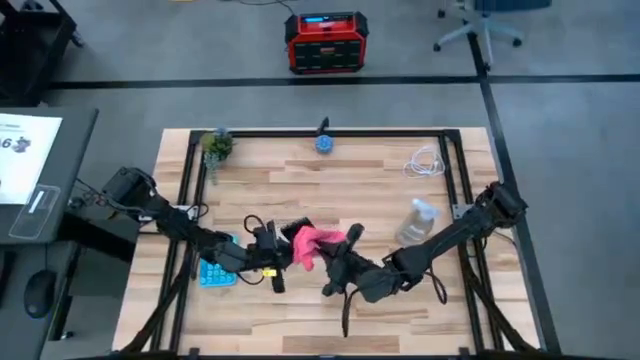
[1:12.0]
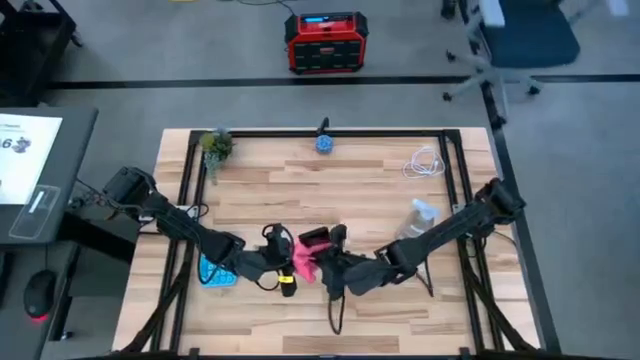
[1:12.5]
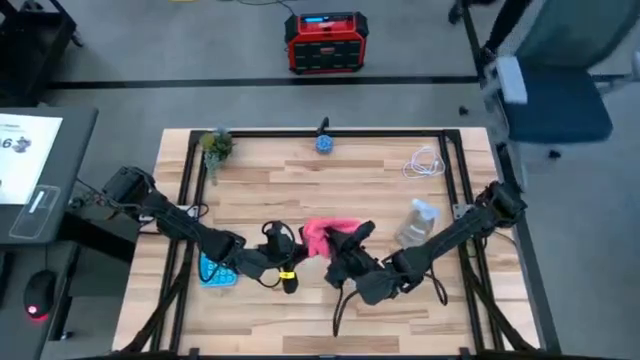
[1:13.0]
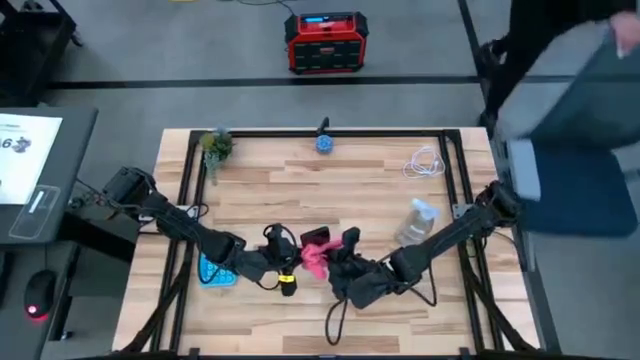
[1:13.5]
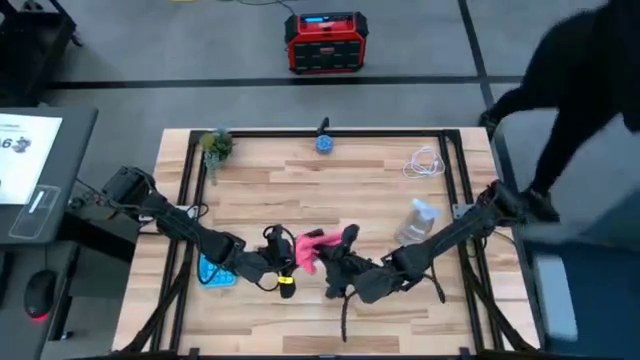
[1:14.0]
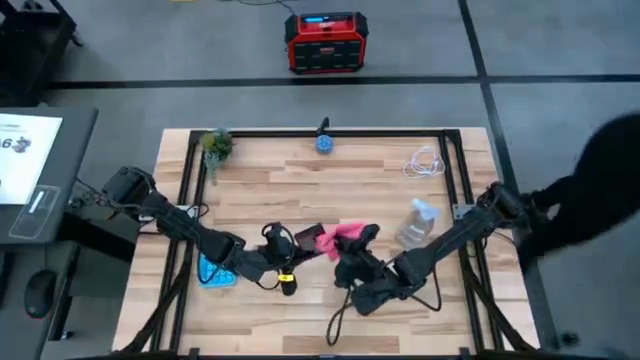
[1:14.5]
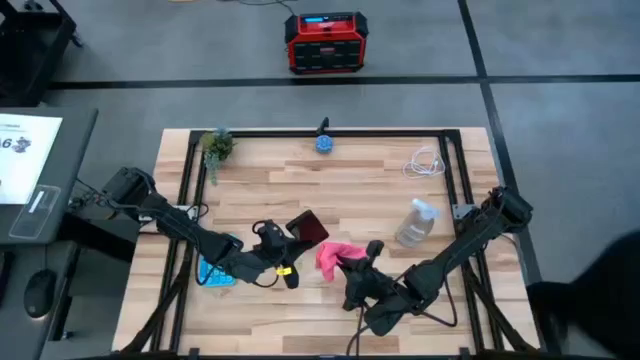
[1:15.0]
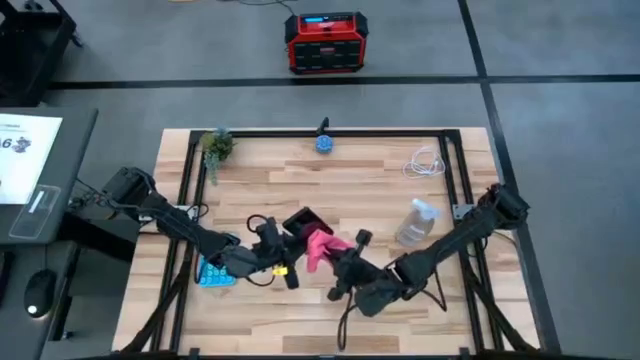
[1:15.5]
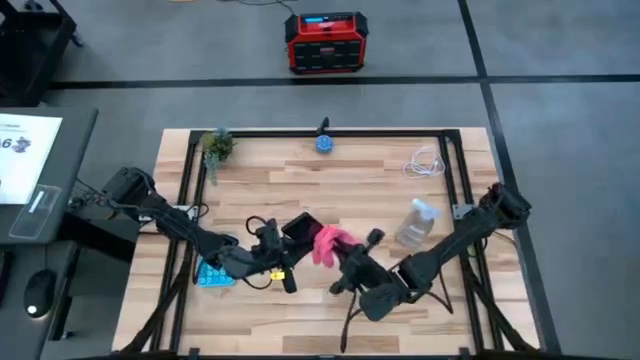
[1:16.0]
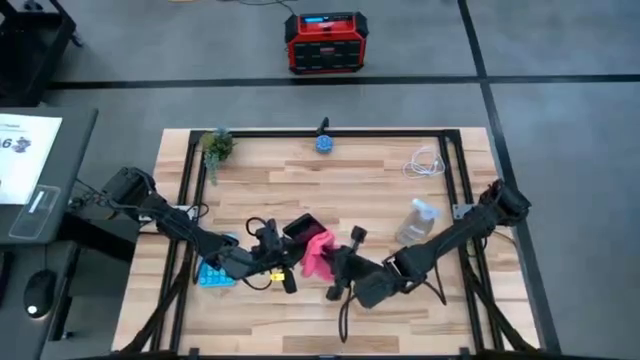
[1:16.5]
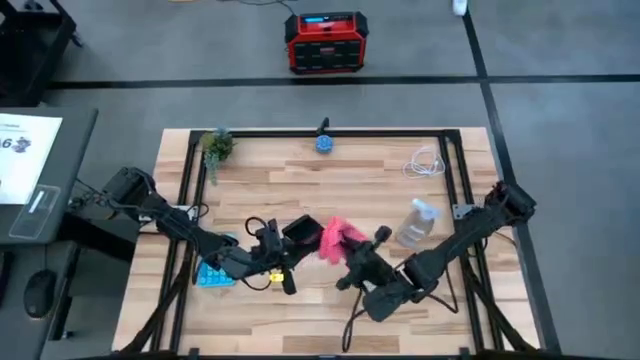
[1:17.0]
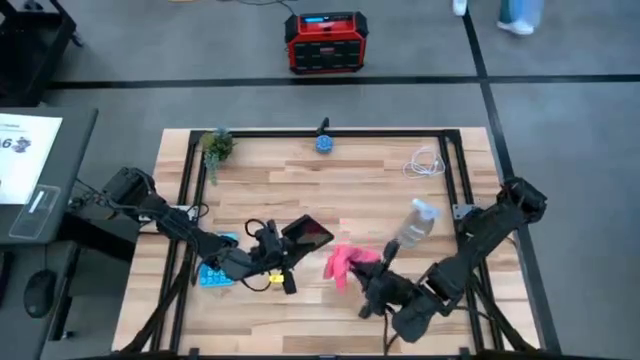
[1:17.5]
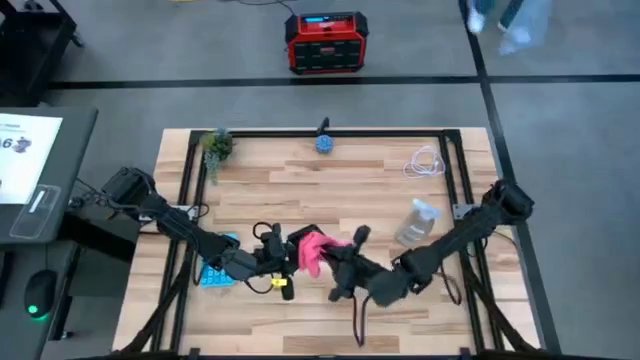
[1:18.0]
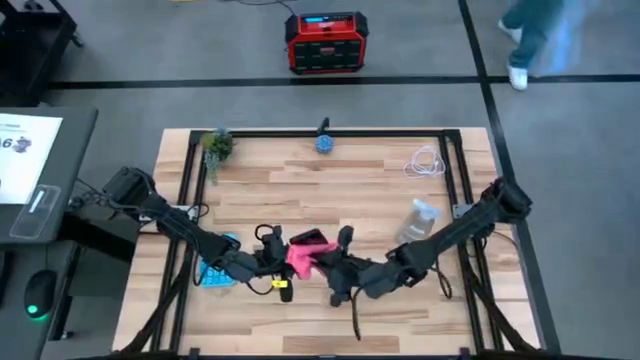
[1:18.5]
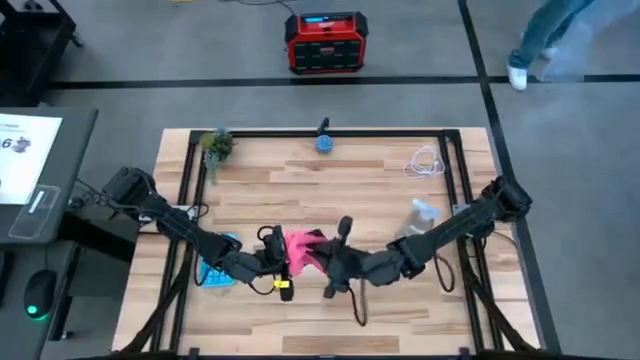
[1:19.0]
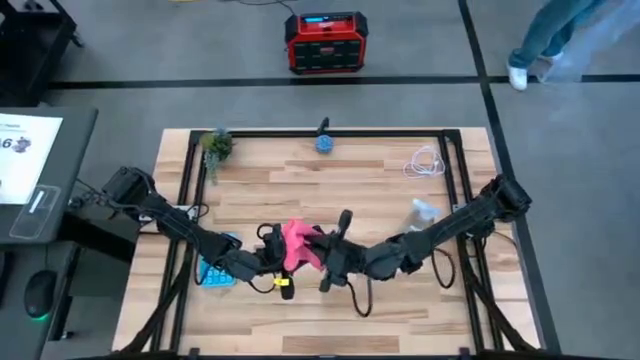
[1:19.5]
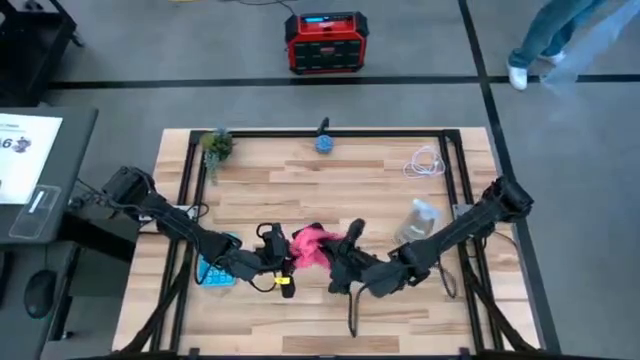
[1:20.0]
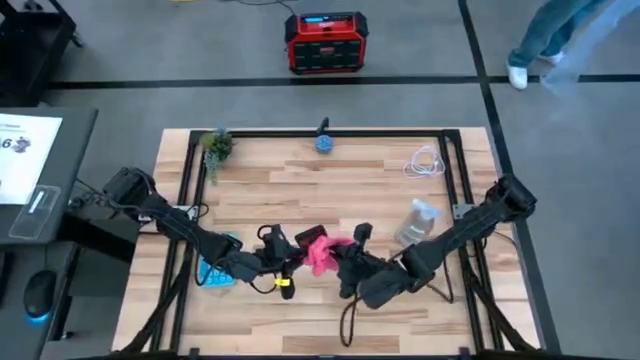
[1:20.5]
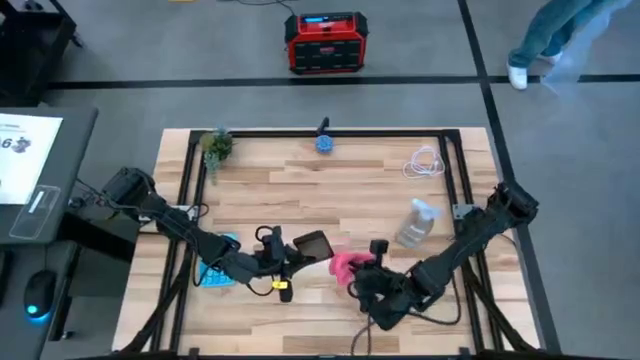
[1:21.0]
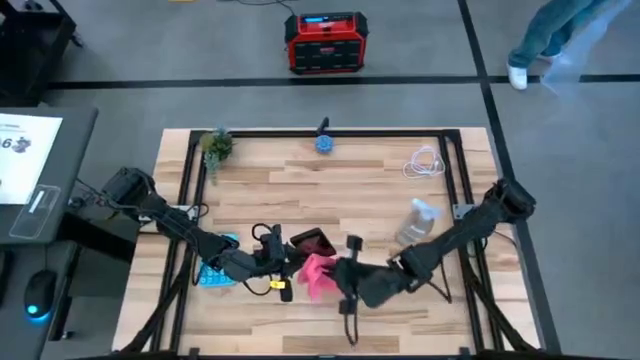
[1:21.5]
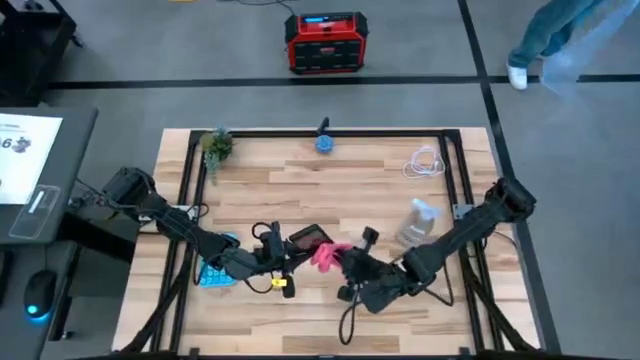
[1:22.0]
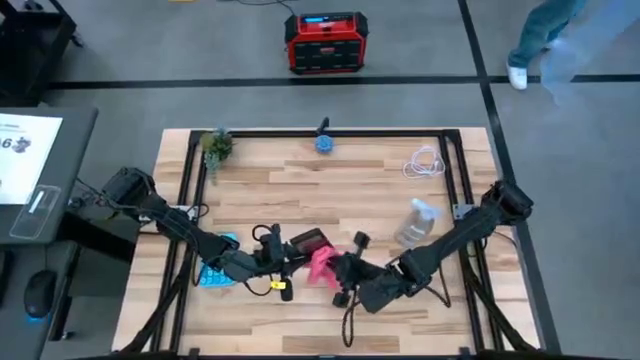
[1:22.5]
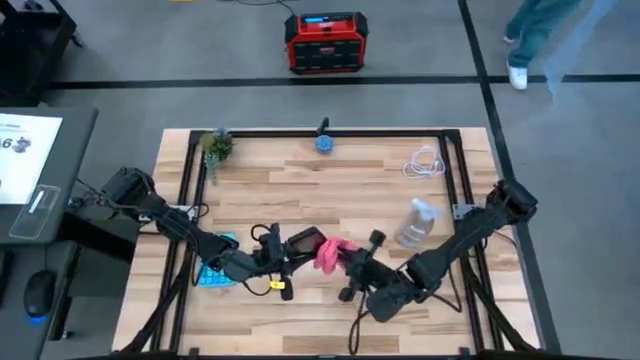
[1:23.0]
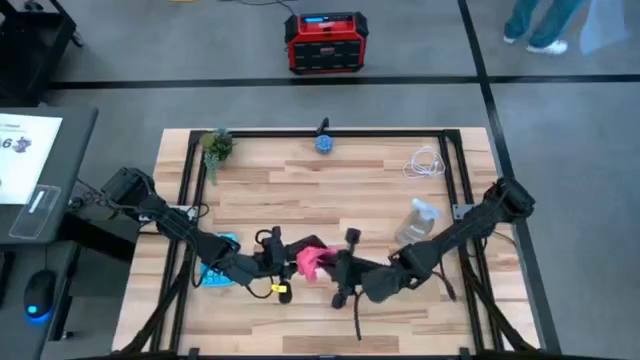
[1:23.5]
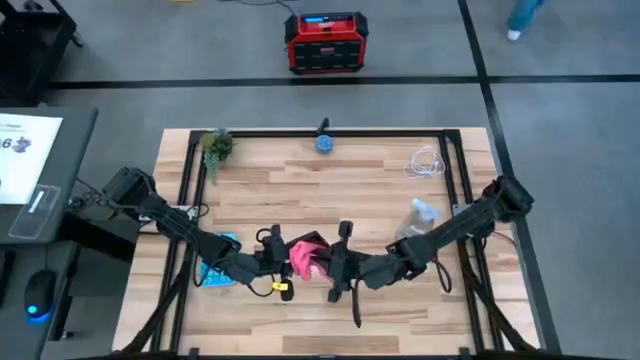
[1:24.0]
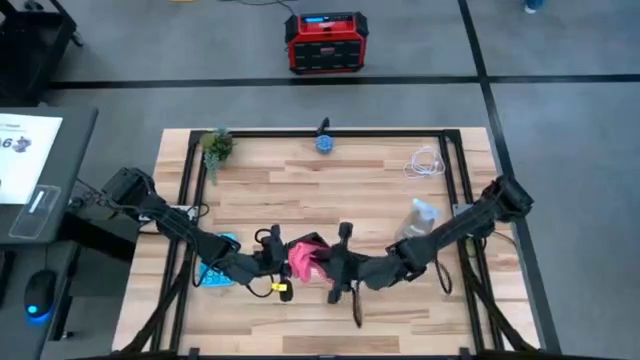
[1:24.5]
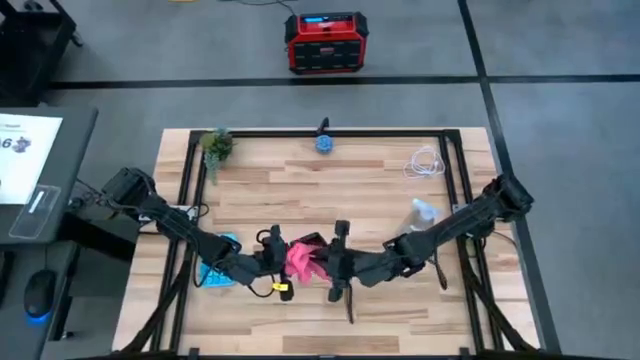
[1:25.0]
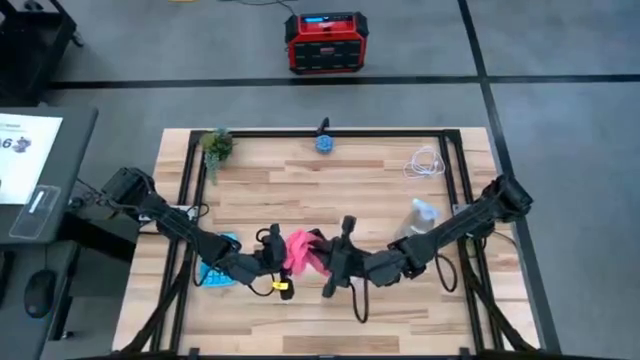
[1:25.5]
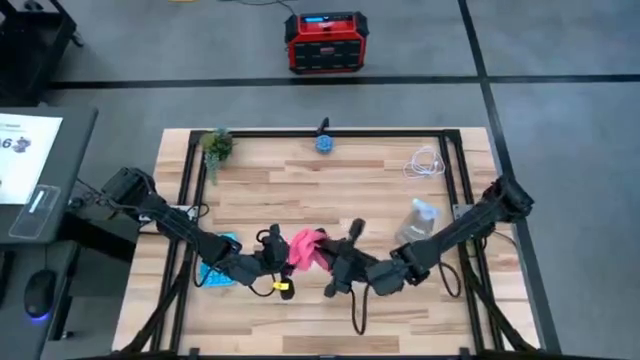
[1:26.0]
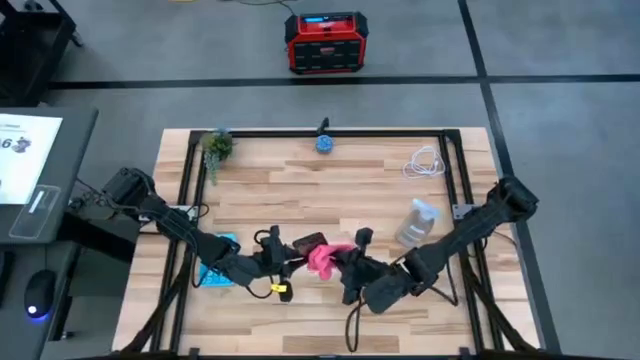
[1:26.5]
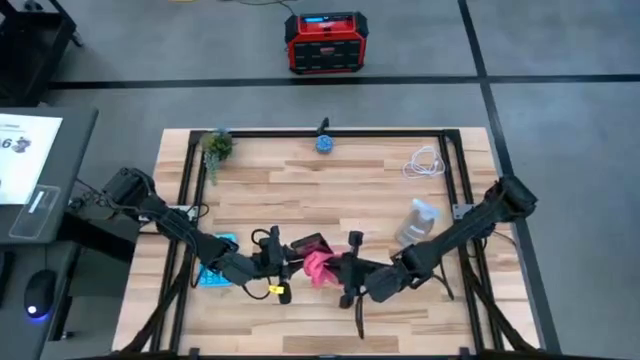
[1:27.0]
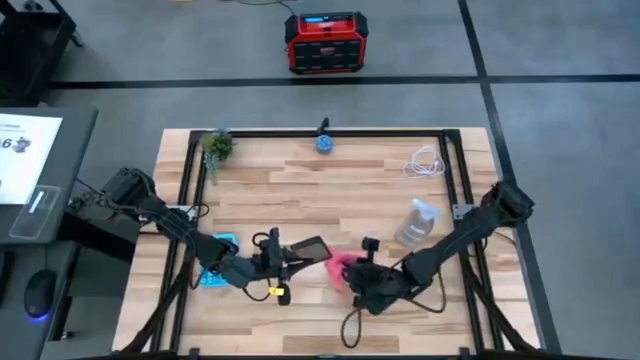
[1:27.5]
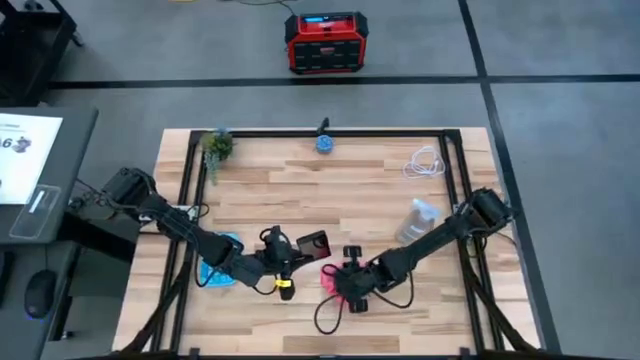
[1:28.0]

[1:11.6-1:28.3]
Task: Apply microfiber cloth
Wipe the front of the black cellphone using the pink microfiber cloth

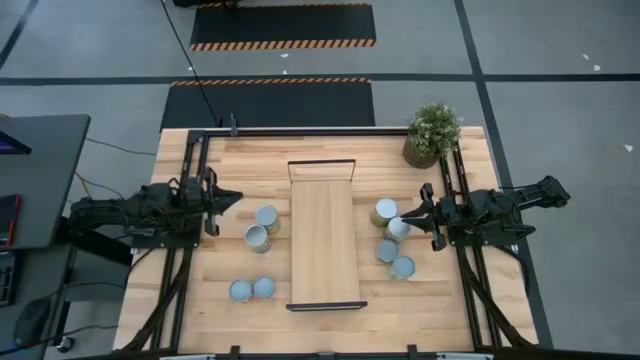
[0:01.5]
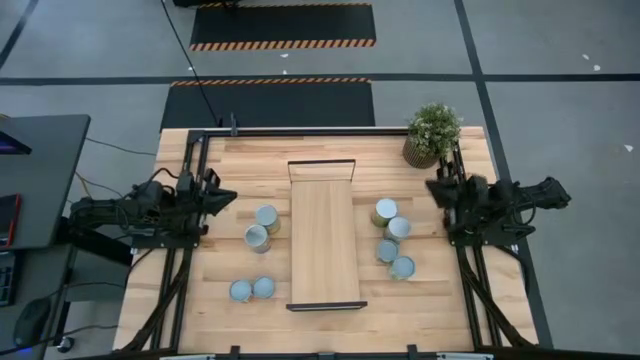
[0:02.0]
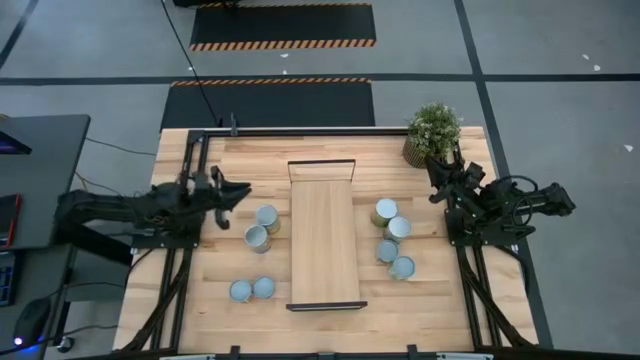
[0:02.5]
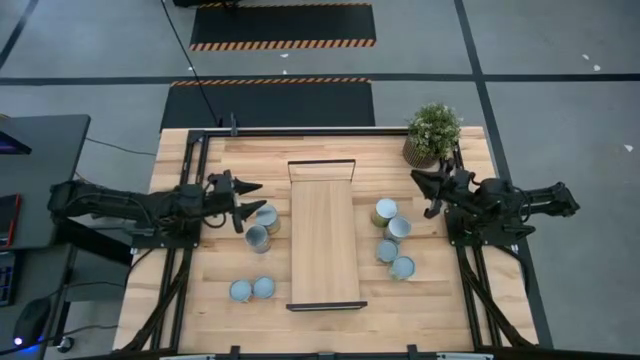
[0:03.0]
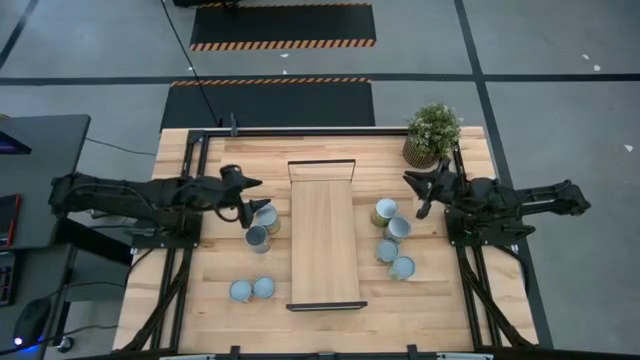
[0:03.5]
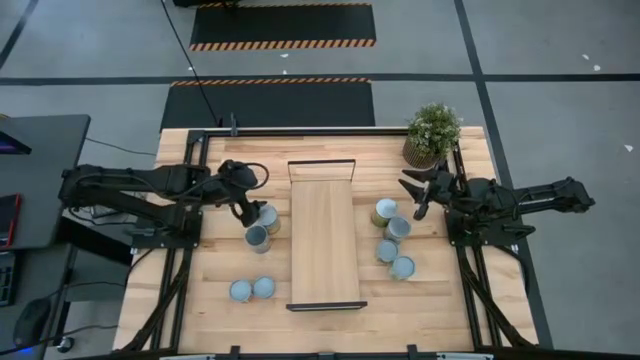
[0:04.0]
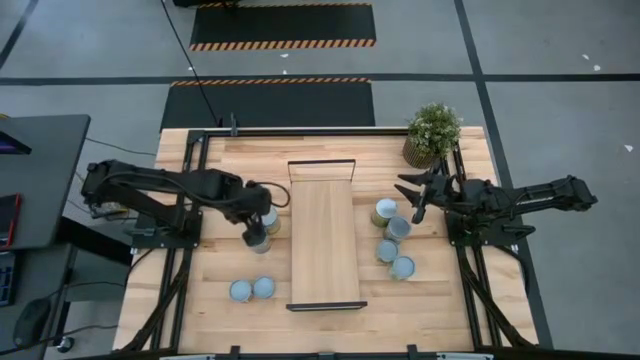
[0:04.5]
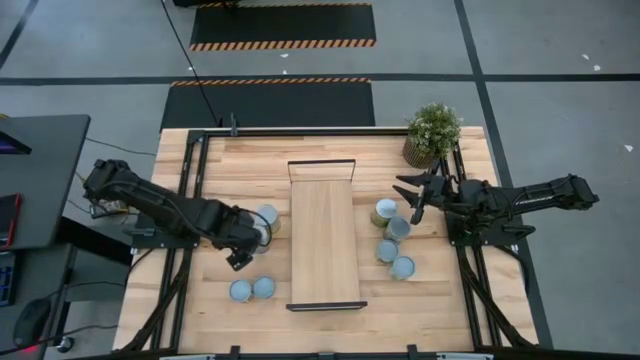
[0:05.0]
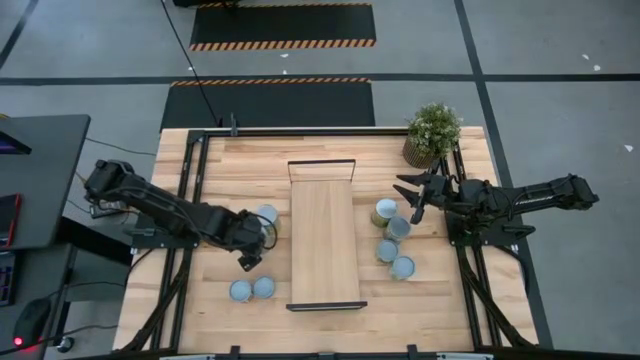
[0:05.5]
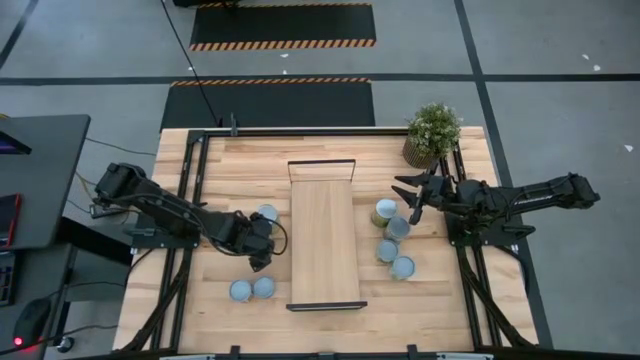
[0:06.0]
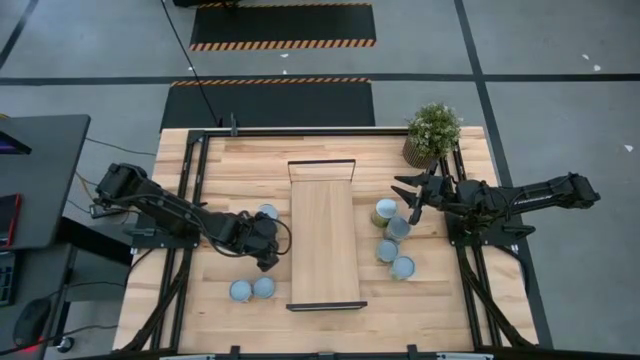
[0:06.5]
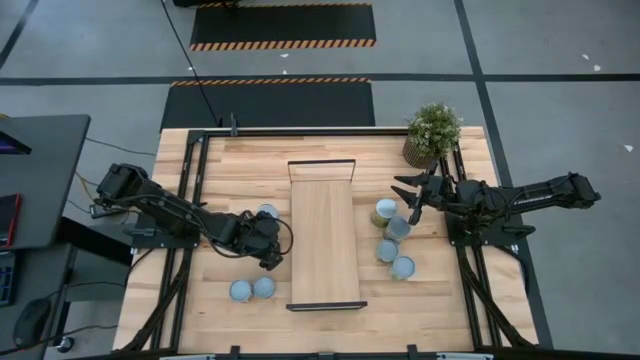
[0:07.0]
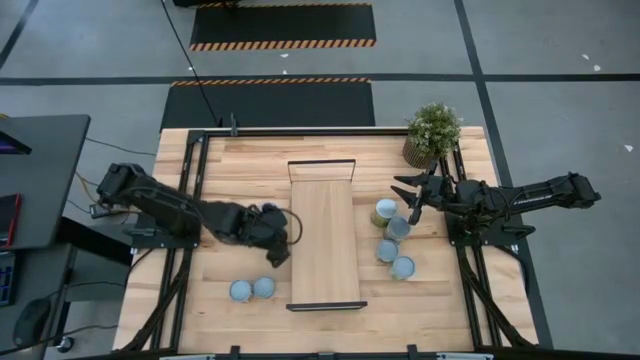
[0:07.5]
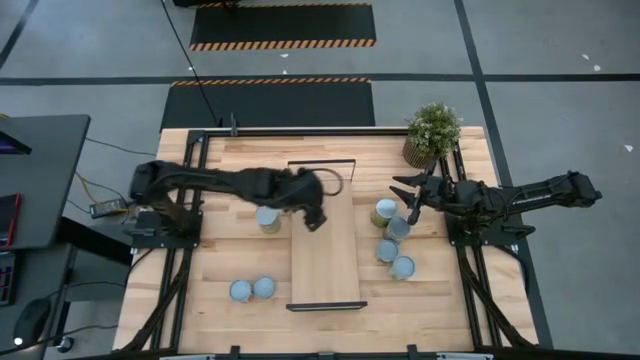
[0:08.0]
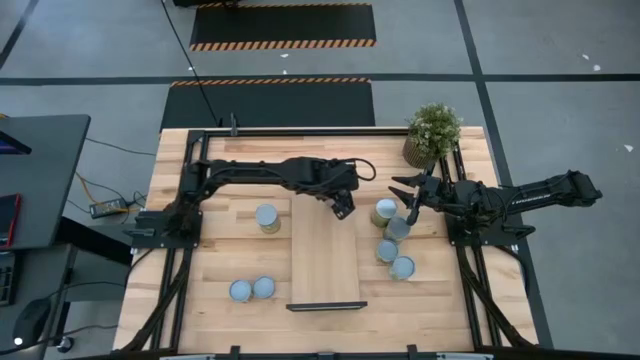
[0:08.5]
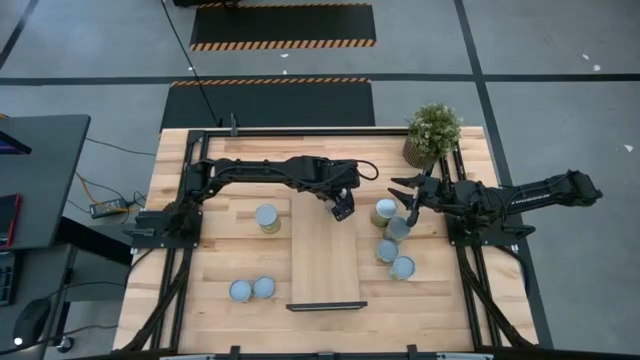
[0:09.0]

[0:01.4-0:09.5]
Task: Pick and place cans onto a shelf
Put the canned peaches on the shelf
